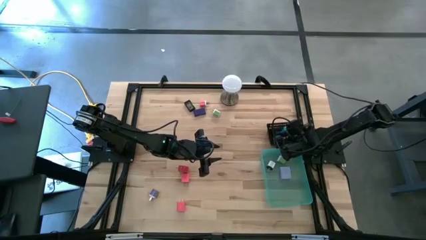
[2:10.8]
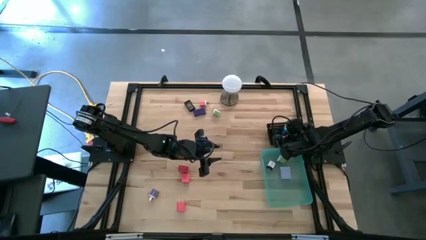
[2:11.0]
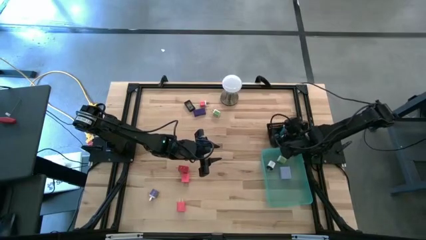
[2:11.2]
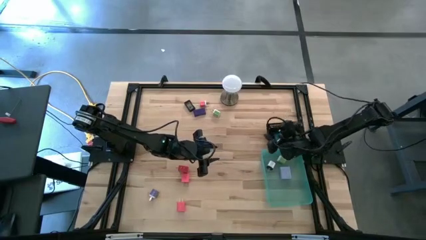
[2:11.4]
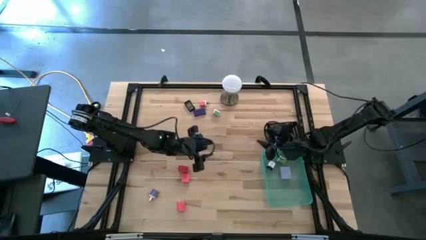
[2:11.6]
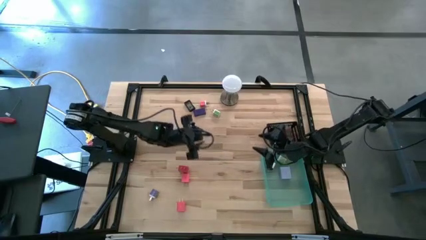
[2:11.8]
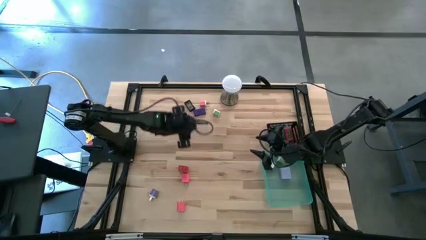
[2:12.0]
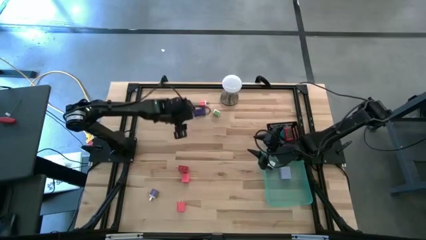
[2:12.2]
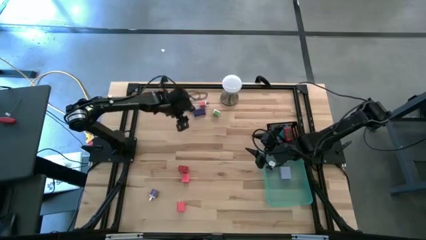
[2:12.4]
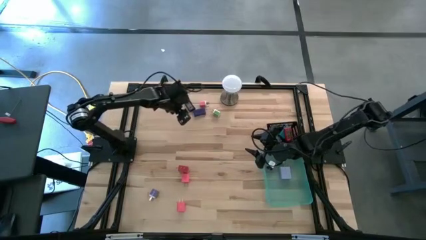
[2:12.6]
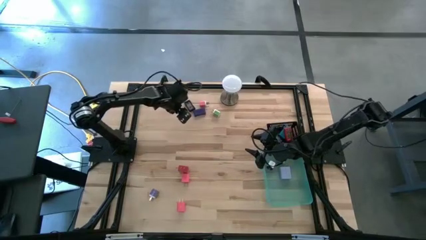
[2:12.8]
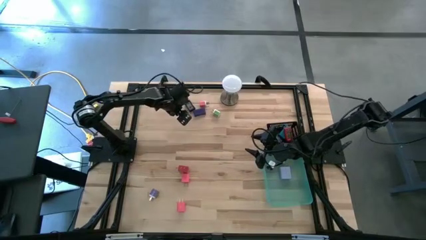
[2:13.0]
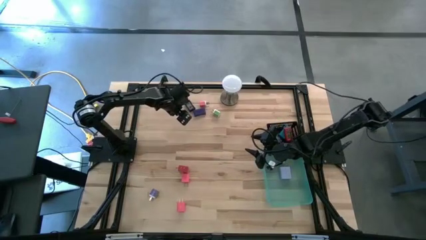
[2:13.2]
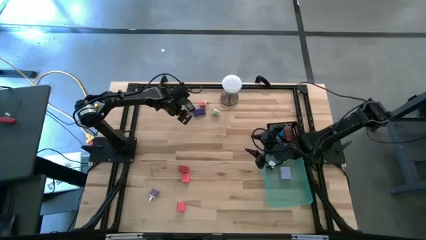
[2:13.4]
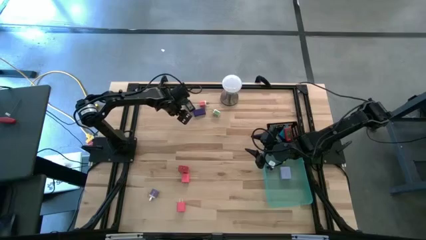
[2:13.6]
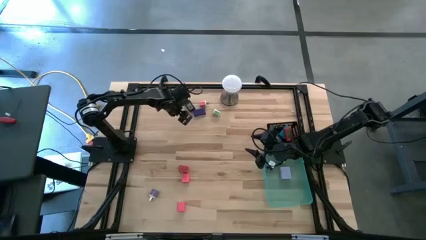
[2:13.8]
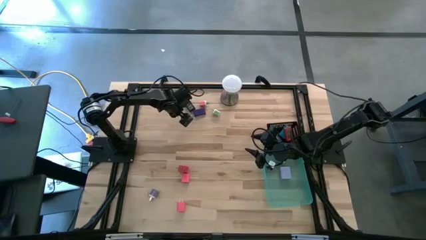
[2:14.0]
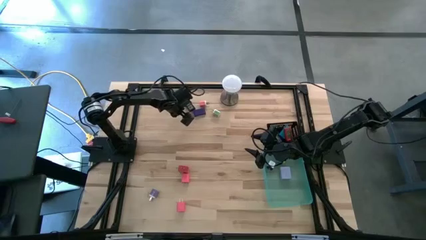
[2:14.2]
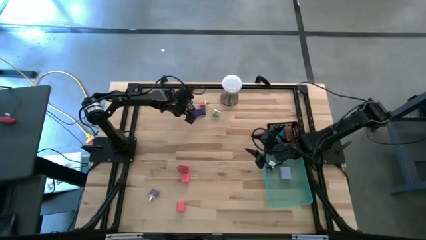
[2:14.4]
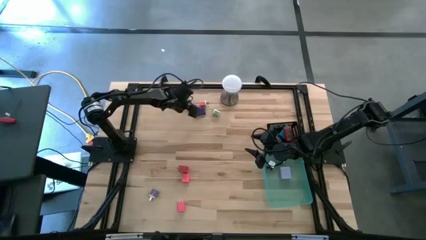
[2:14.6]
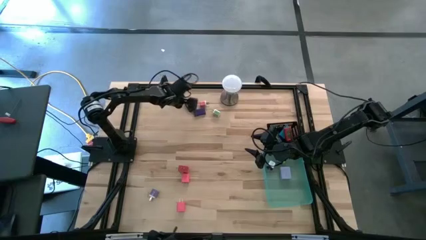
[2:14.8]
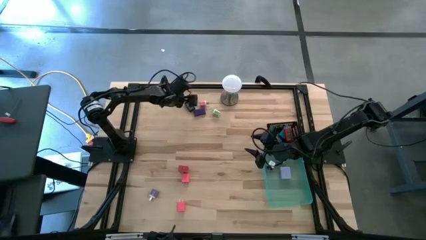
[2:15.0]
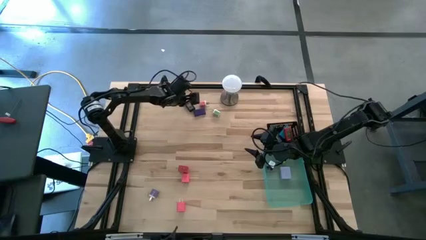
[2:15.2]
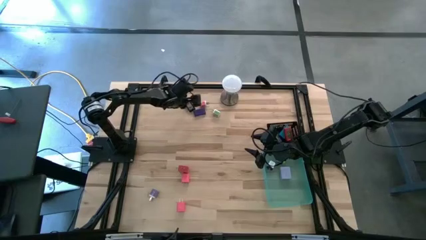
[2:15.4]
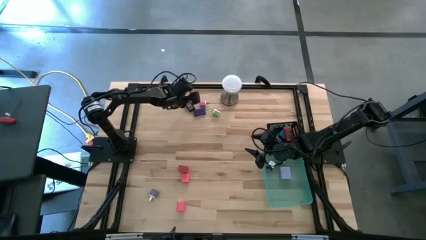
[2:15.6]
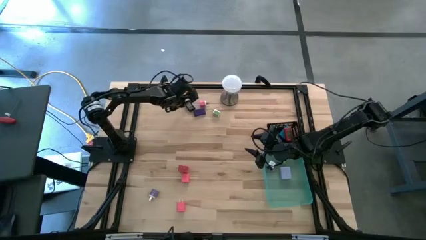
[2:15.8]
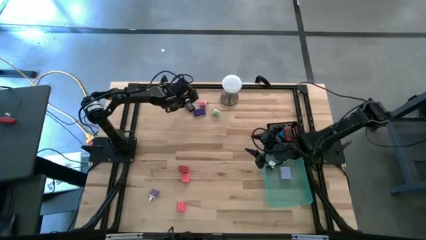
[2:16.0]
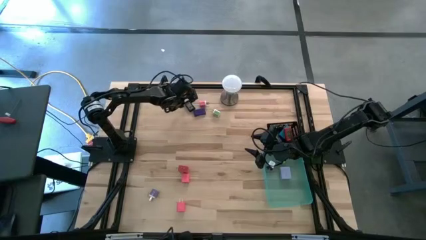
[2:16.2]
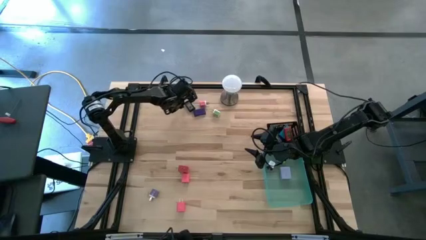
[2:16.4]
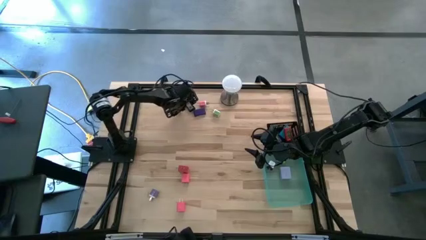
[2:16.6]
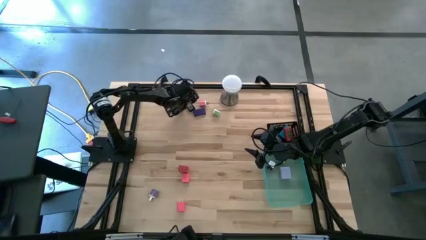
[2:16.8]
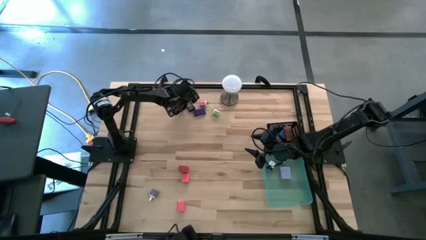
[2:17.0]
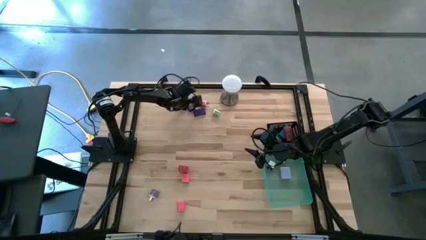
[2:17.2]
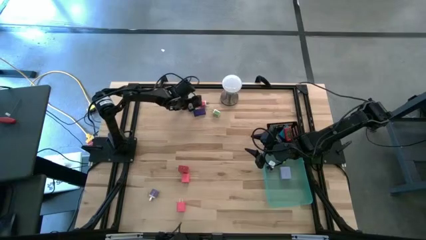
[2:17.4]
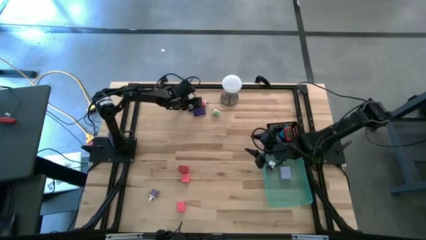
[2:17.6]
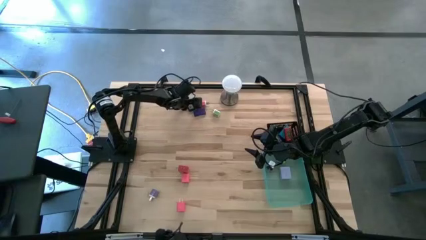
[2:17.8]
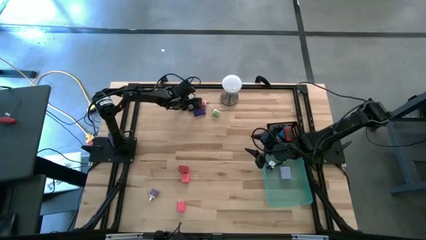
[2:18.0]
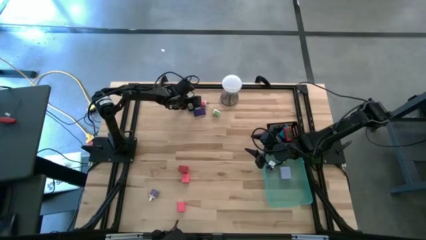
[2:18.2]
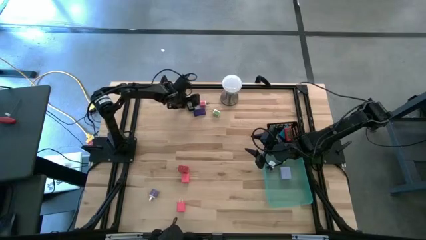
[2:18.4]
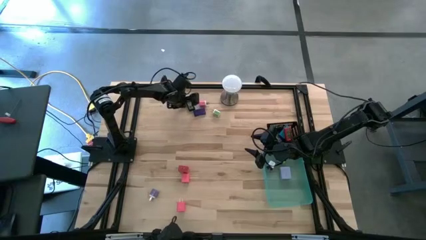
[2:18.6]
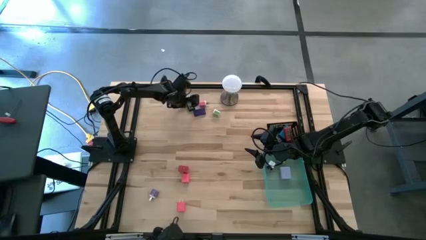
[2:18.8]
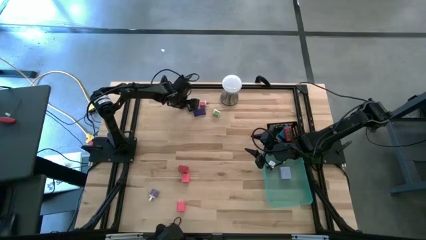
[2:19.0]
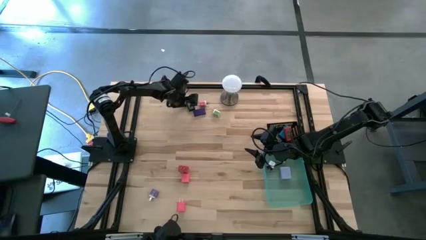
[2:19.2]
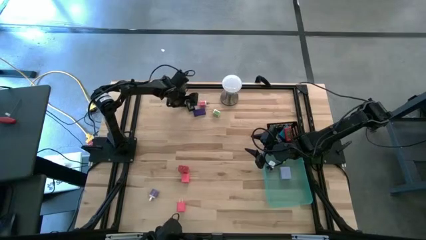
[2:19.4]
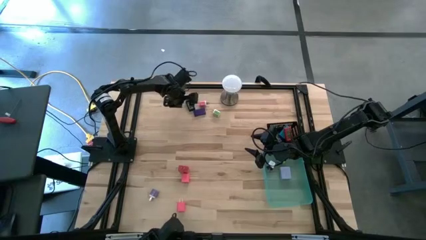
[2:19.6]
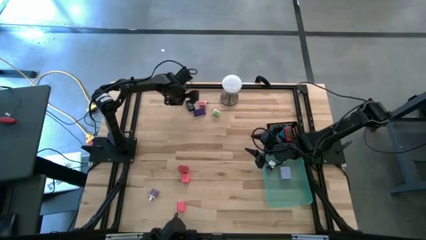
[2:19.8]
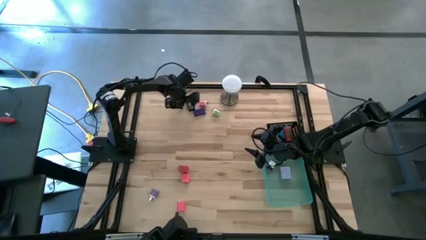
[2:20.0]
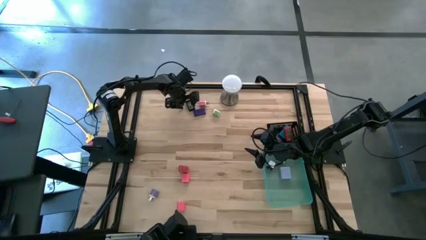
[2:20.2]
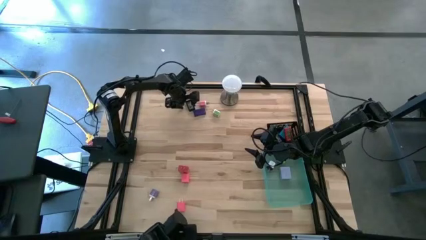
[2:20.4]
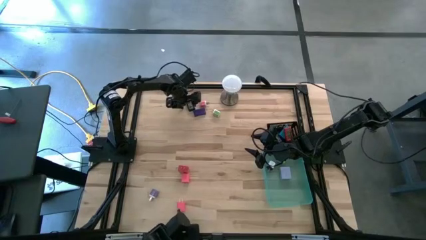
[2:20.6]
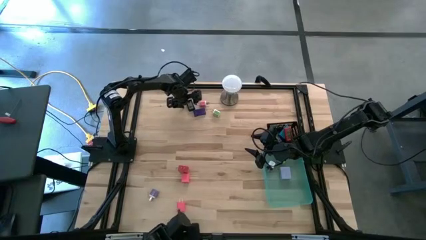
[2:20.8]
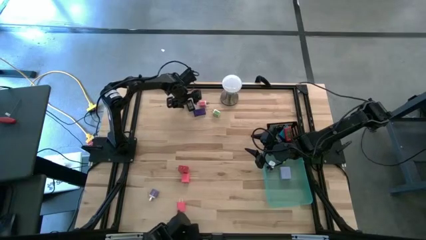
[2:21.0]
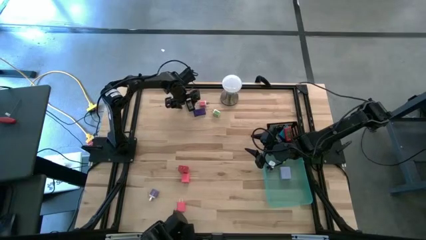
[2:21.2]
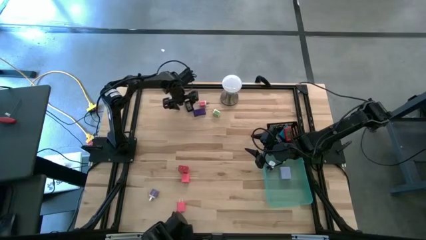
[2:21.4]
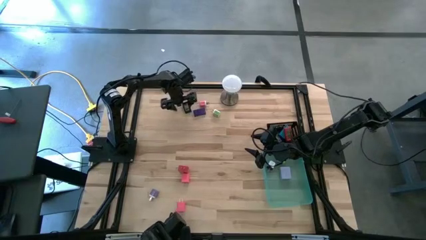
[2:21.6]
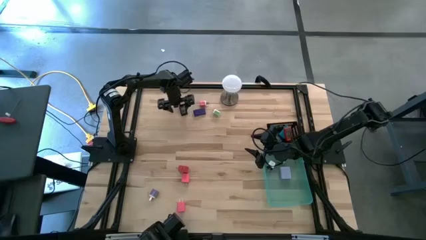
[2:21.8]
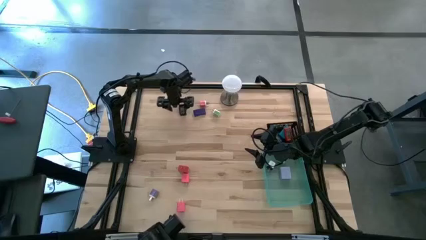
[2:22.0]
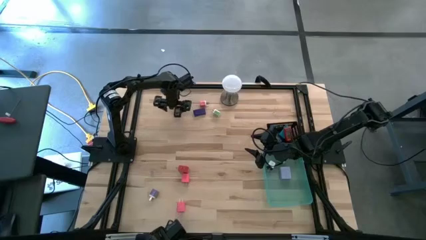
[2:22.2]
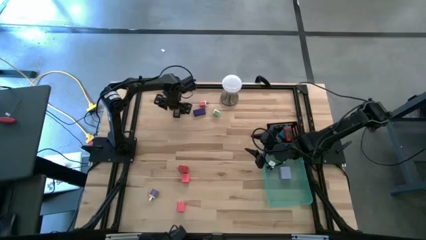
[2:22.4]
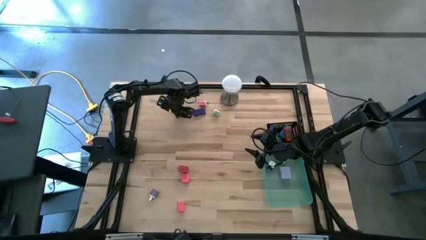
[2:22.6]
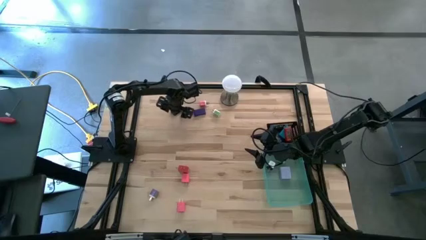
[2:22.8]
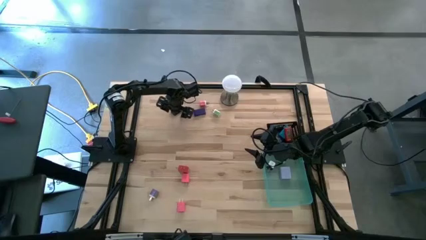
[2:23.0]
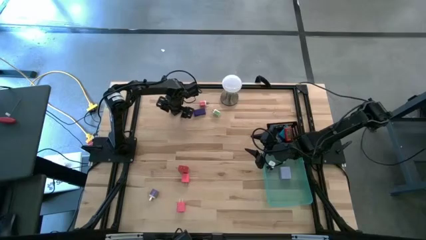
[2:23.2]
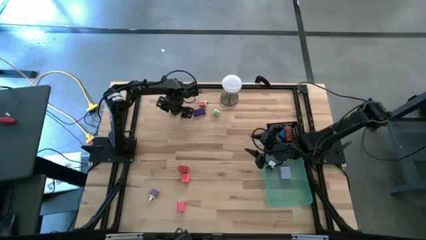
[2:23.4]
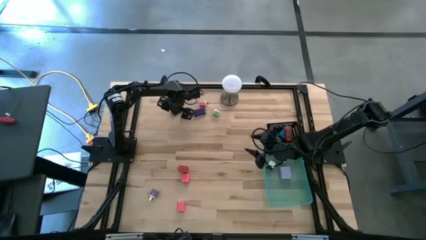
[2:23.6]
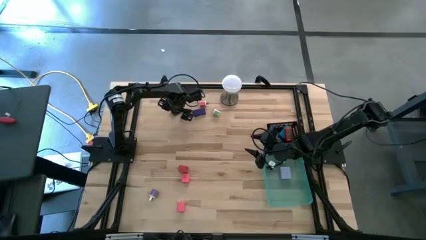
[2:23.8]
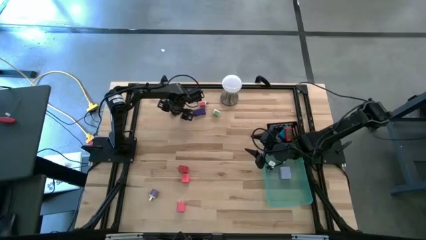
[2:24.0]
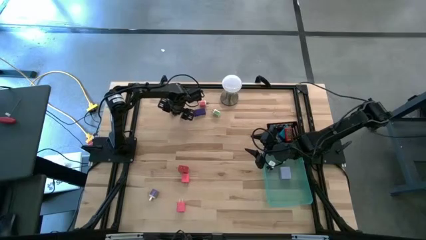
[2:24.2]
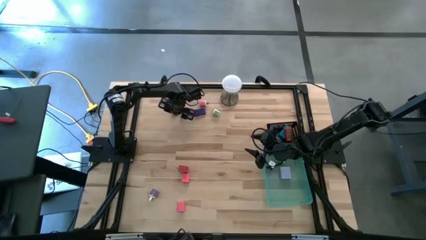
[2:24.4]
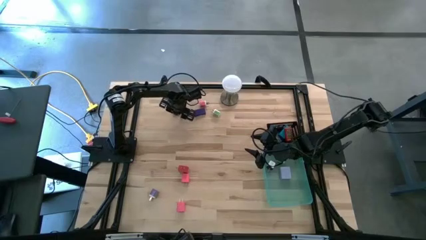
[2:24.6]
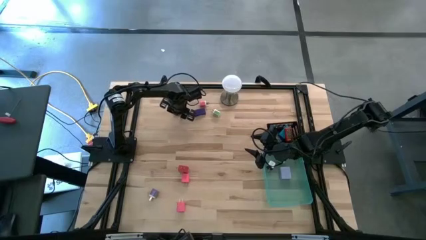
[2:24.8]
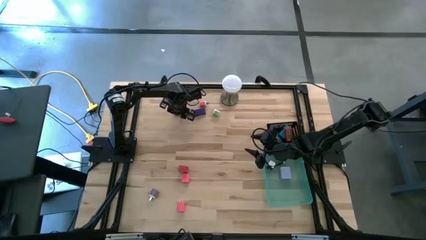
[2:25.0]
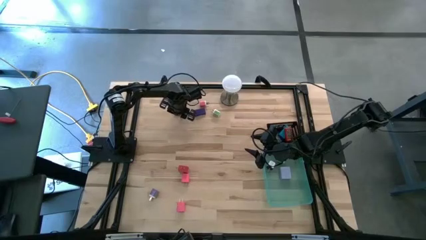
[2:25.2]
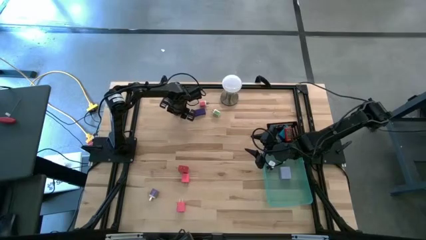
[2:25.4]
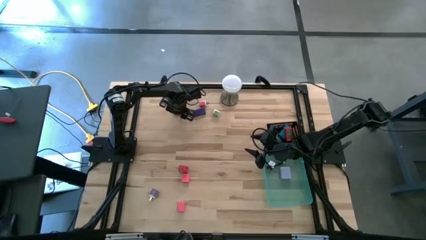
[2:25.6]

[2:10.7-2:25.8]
Task: Pick & Place Office items
Put the black digital clock into the black basket

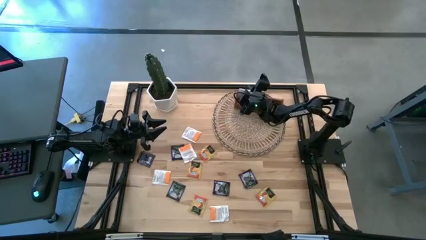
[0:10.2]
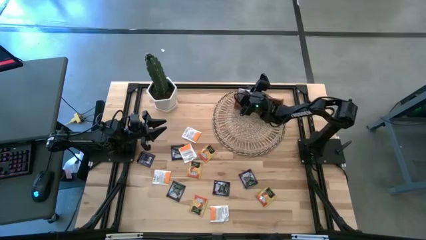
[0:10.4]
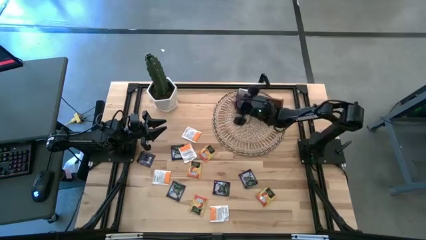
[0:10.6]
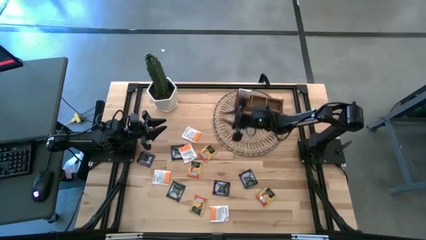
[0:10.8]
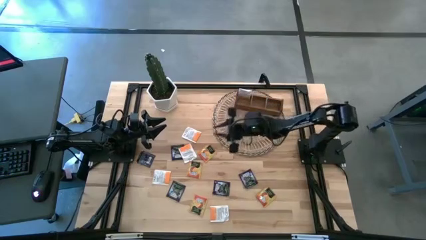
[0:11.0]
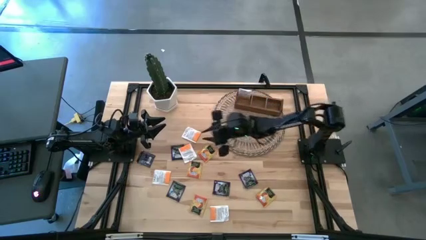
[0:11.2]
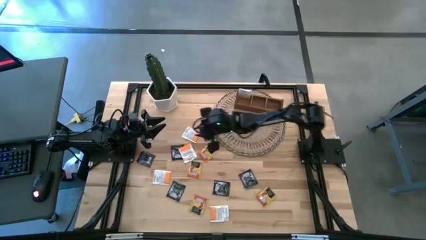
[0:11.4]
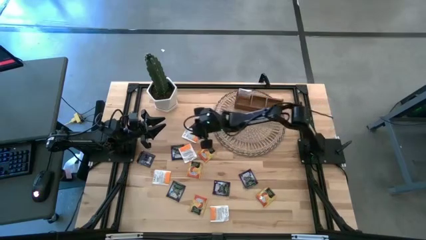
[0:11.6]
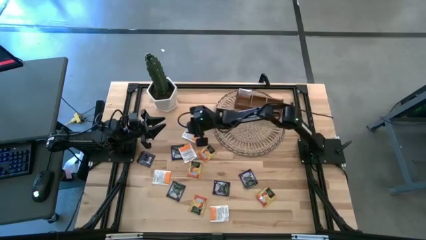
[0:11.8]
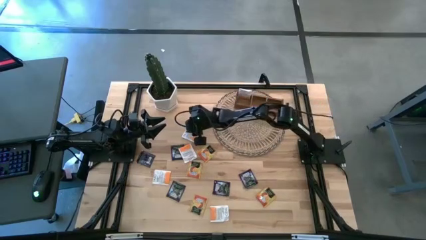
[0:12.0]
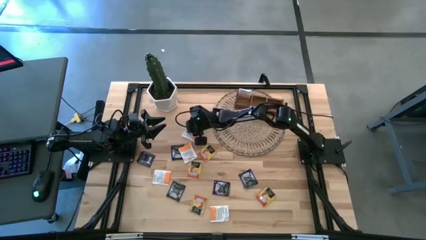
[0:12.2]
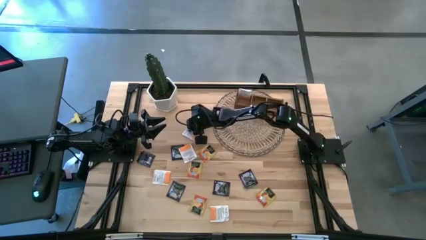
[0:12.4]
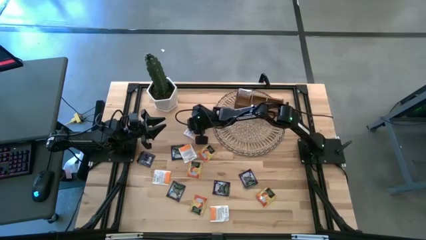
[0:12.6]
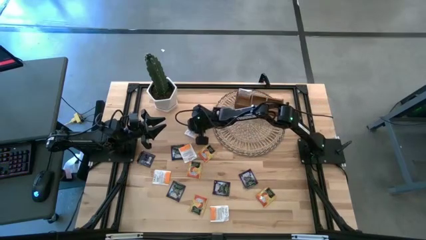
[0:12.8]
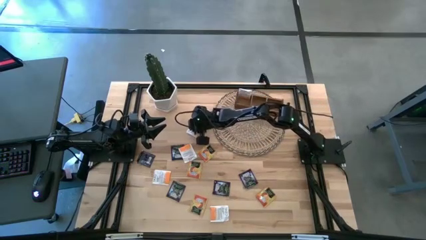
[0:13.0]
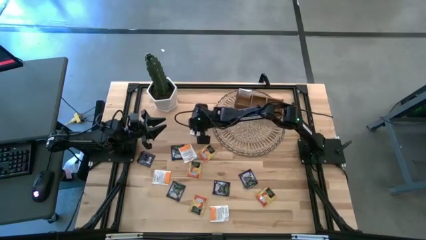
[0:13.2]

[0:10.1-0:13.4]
Task: Pick & Place Tea
Put the orange tea bag into the left section of the wooden organizer
